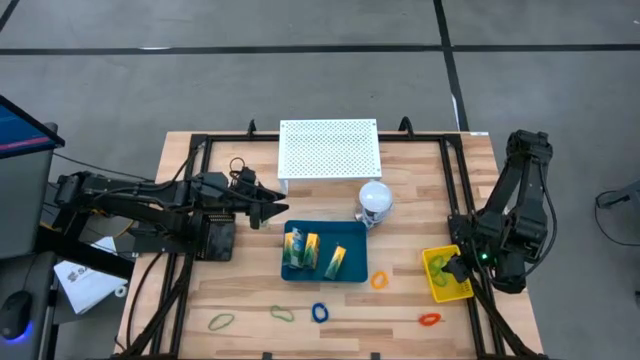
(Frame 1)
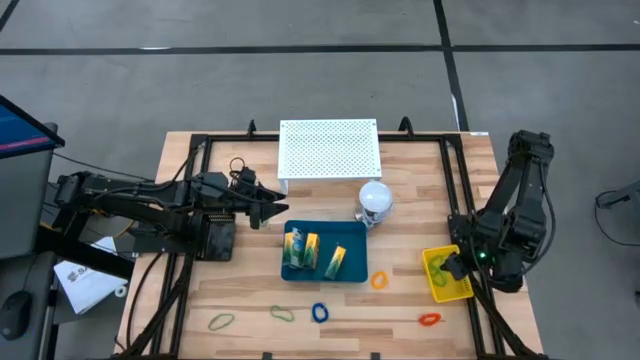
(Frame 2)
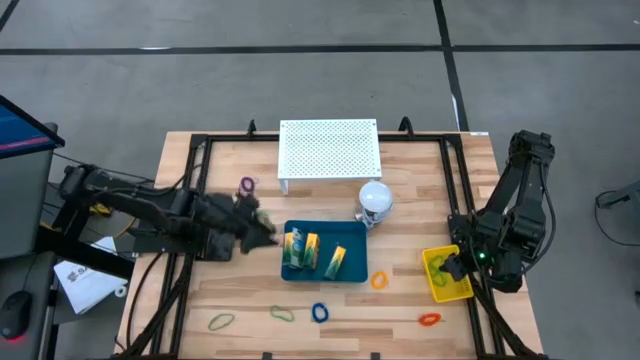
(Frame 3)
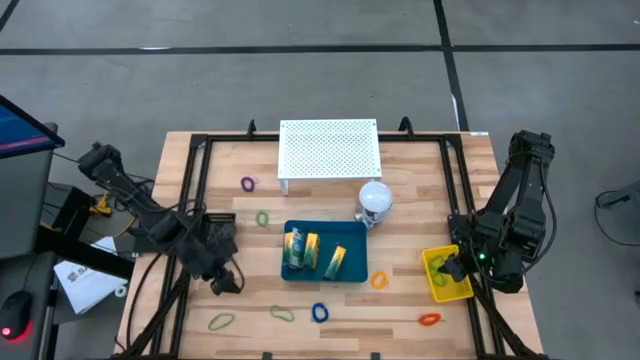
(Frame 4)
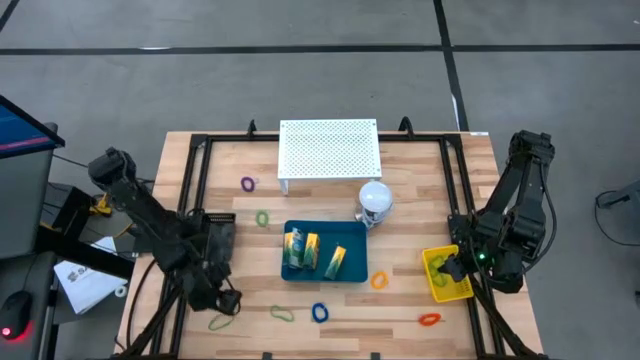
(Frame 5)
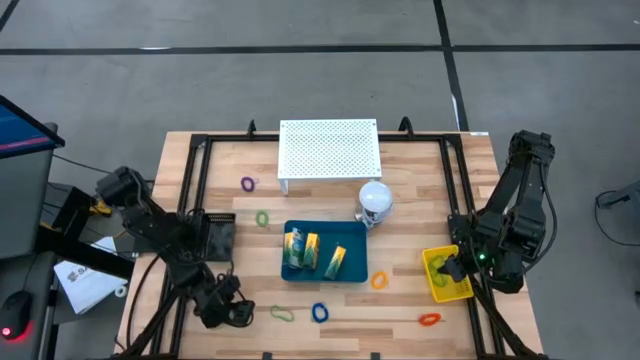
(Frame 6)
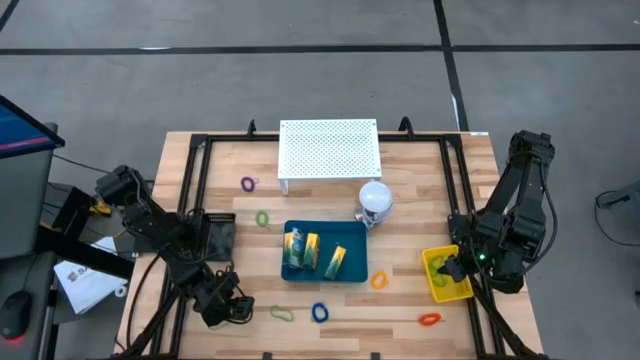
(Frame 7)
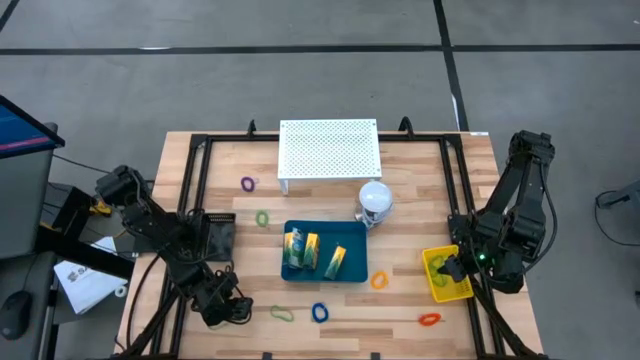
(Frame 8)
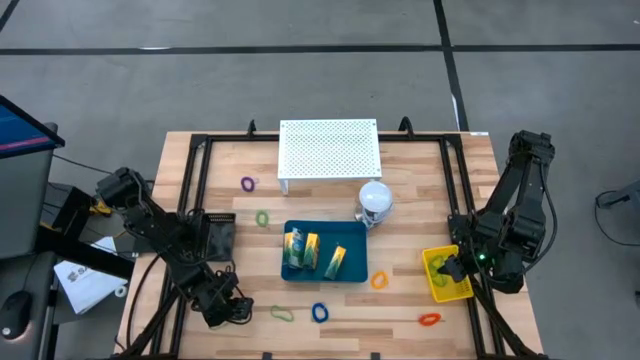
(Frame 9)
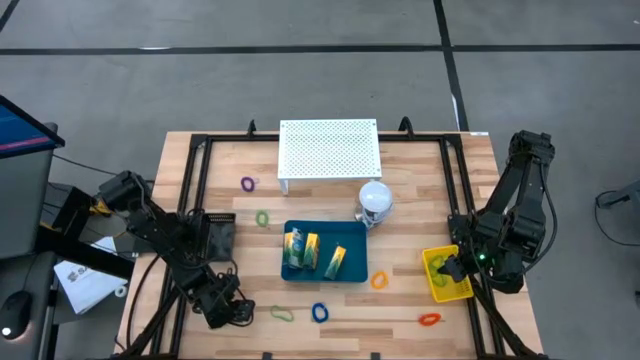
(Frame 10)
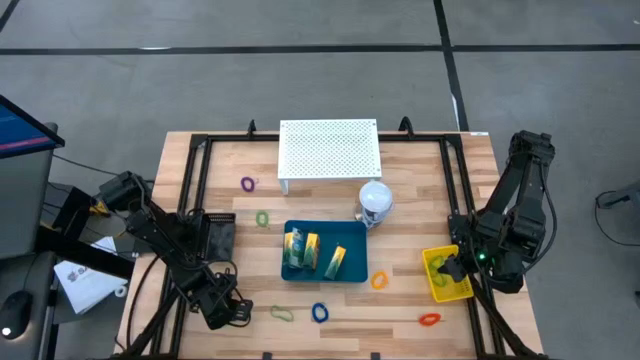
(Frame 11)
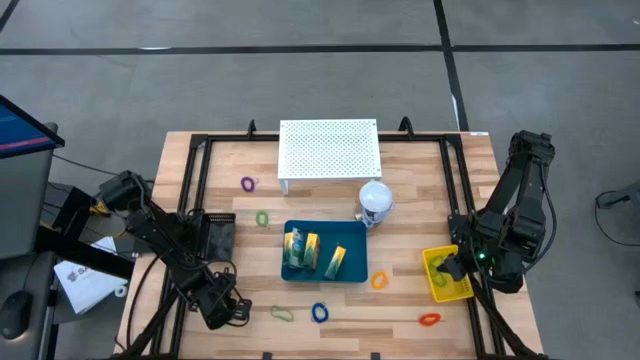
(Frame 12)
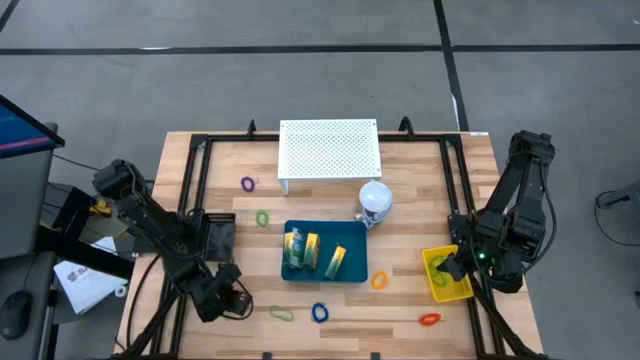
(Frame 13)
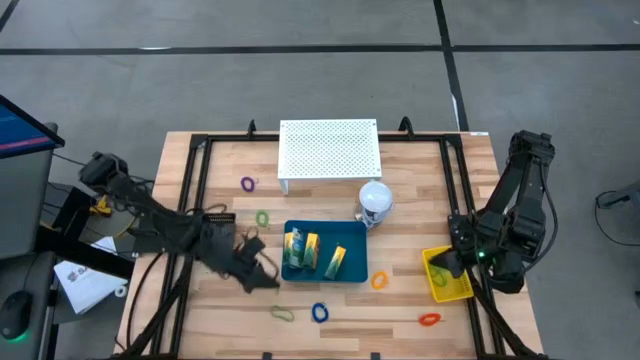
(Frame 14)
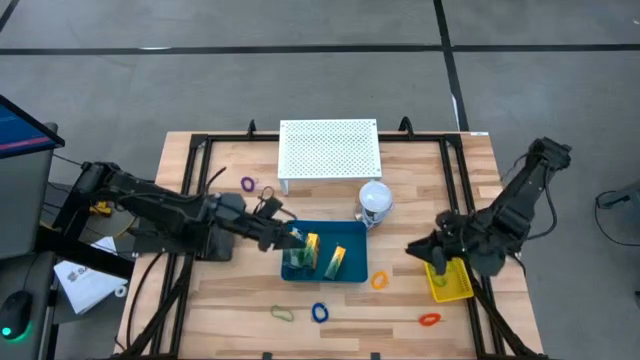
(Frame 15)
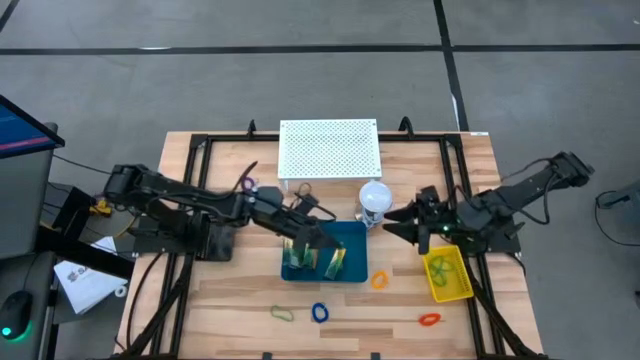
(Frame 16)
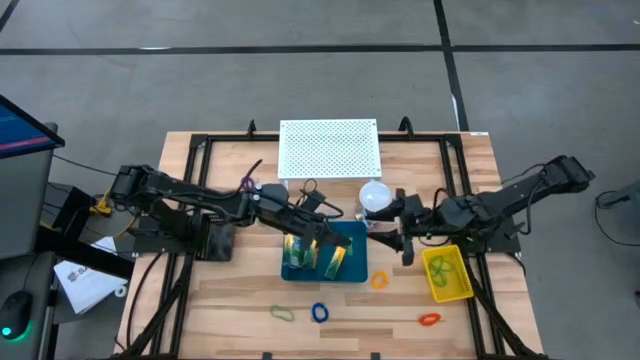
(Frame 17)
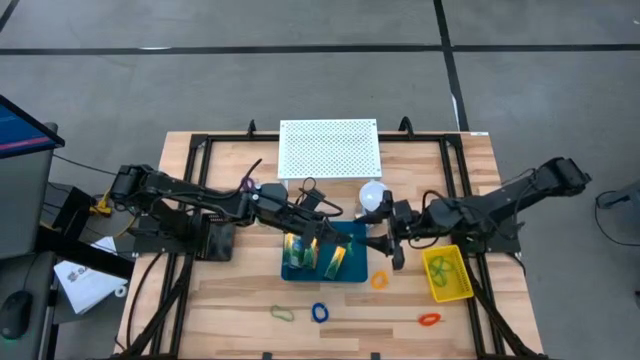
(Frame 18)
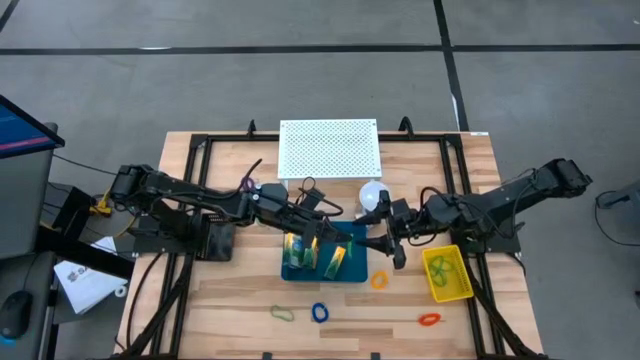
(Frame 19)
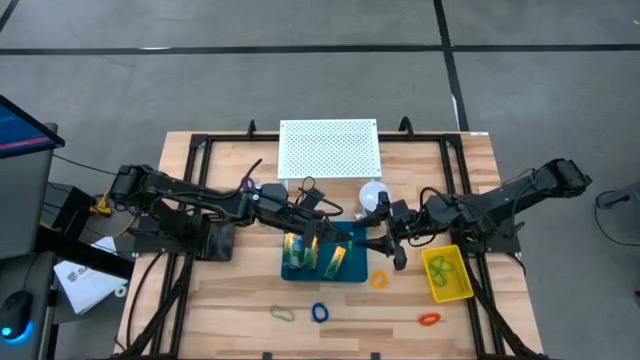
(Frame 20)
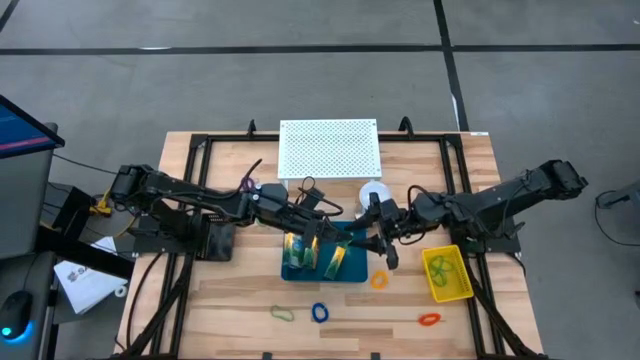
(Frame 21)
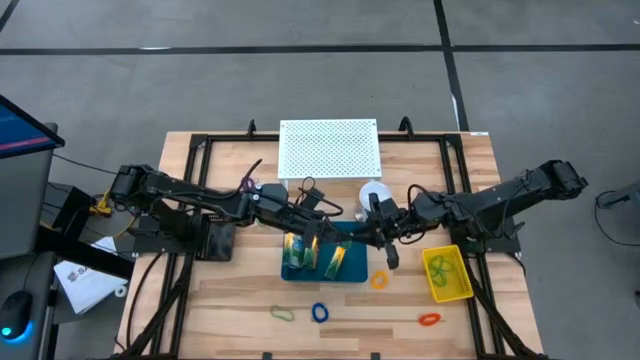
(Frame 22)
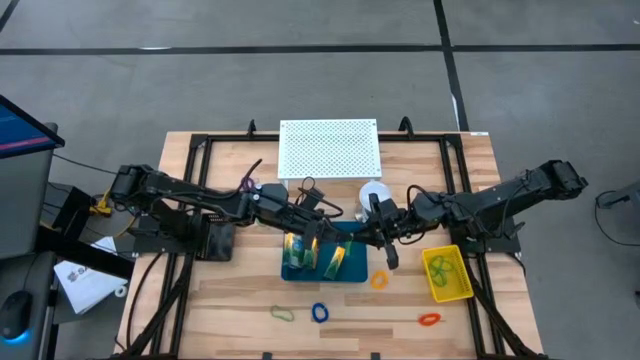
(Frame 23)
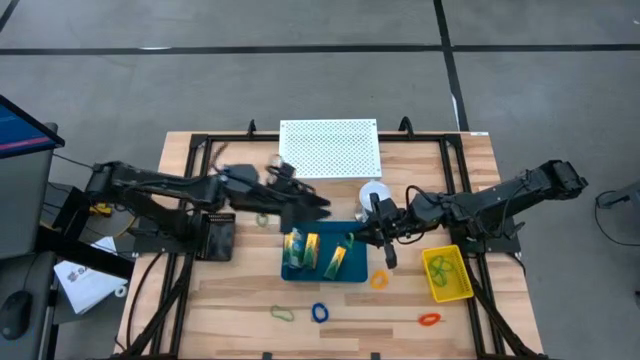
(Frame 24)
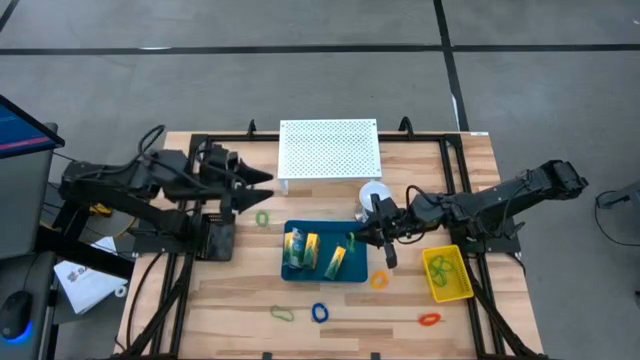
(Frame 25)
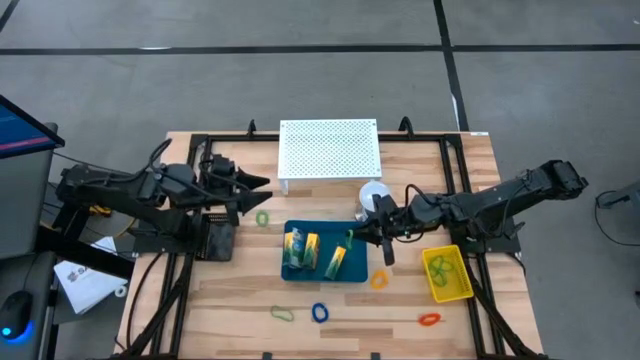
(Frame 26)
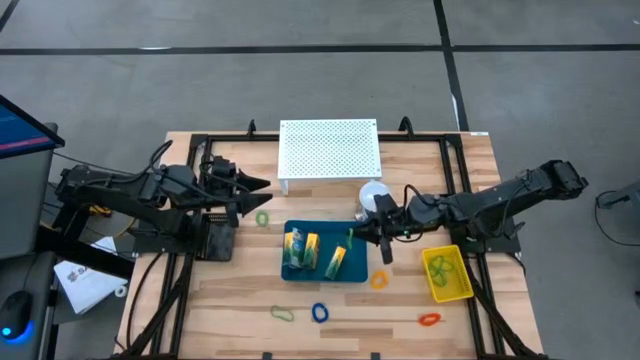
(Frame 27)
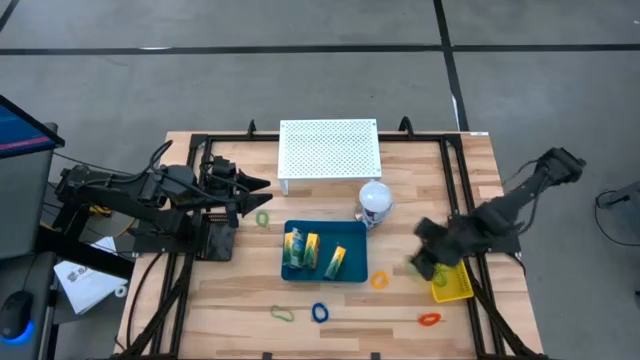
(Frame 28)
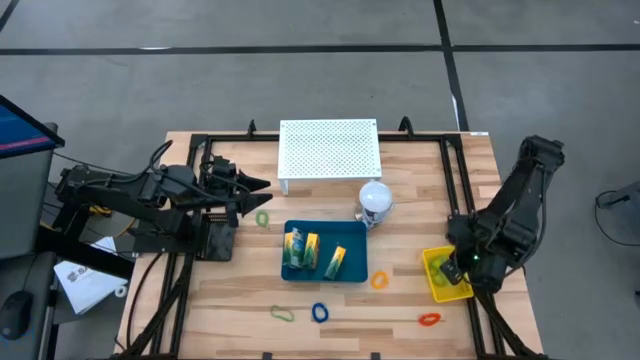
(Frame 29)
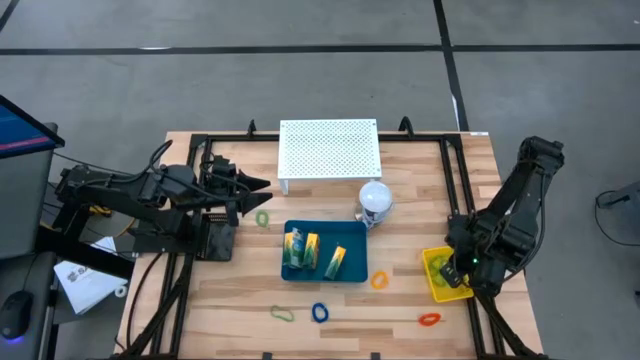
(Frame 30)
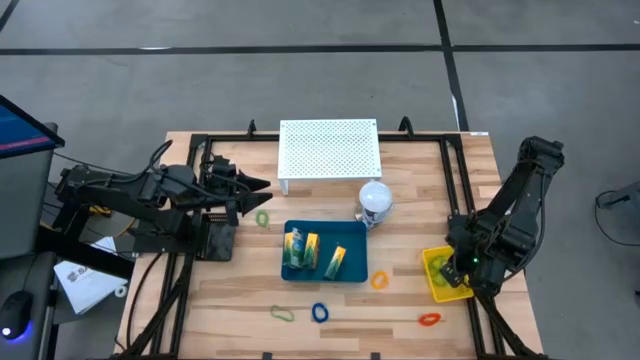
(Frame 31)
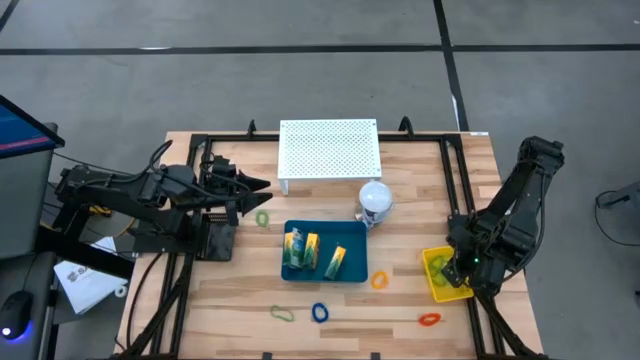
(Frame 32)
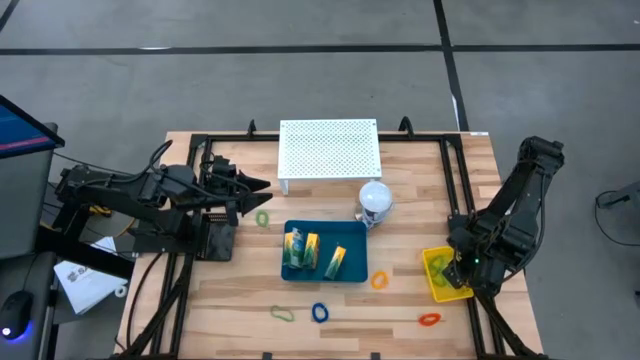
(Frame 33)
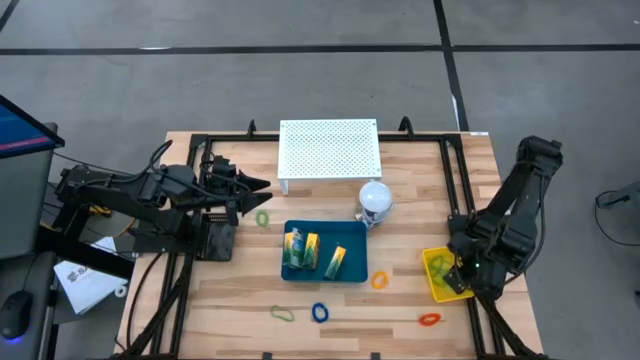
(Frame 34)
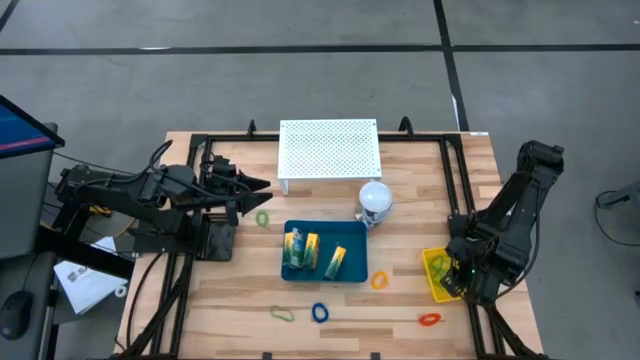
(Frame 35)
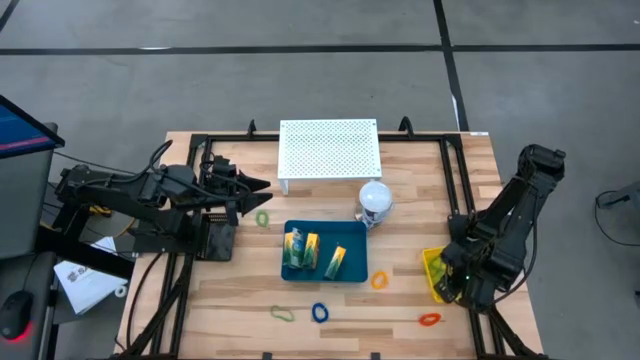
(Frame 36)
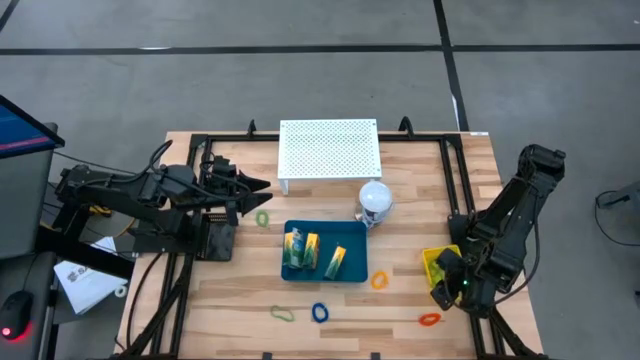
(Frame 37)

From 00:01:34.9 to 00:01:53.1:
Task: Pick & Place Office Desk Supplies
Put the left green rubber band into the yellow bin

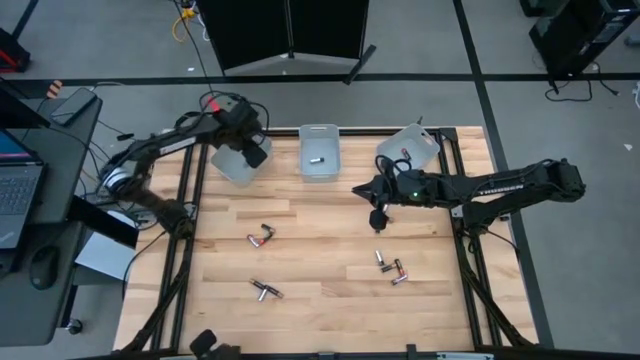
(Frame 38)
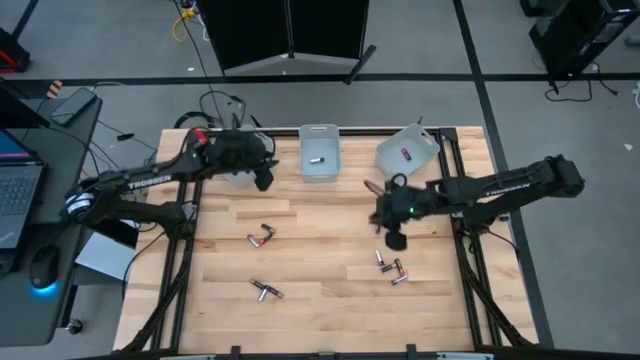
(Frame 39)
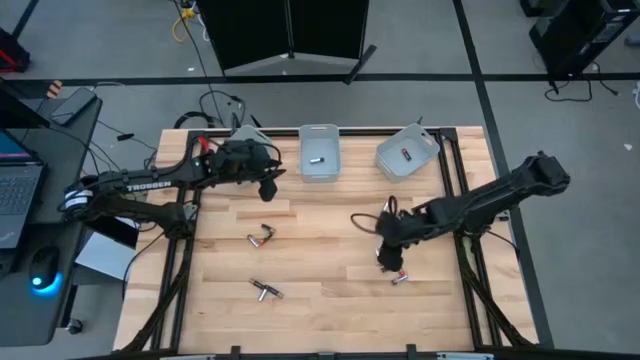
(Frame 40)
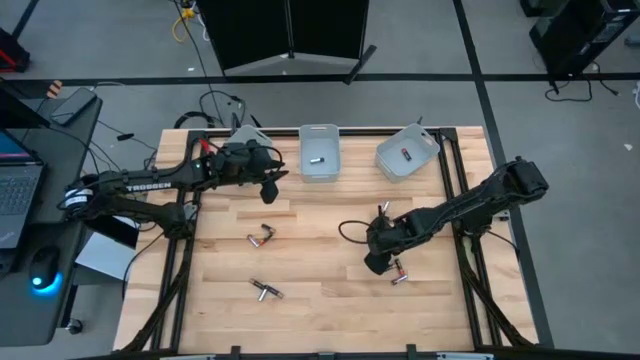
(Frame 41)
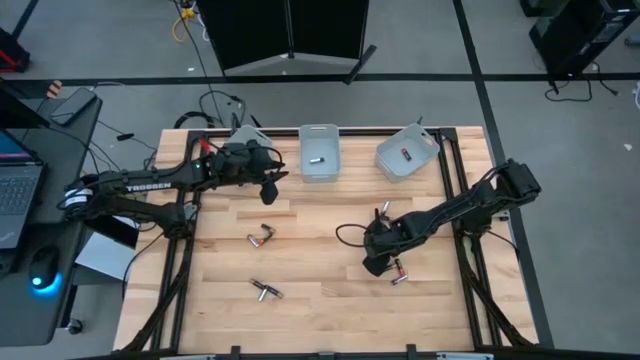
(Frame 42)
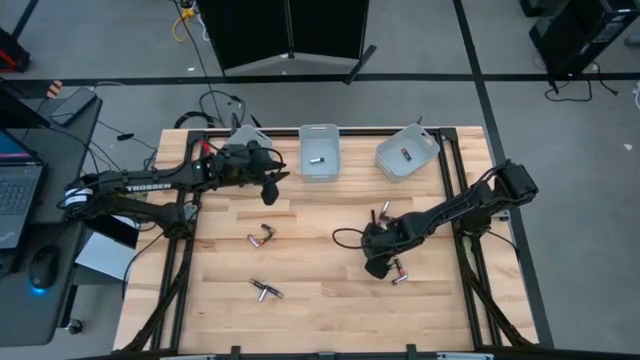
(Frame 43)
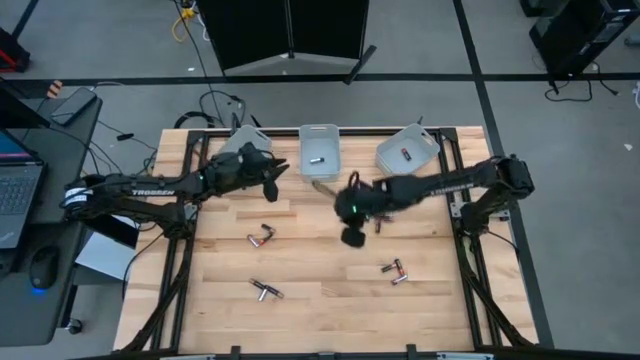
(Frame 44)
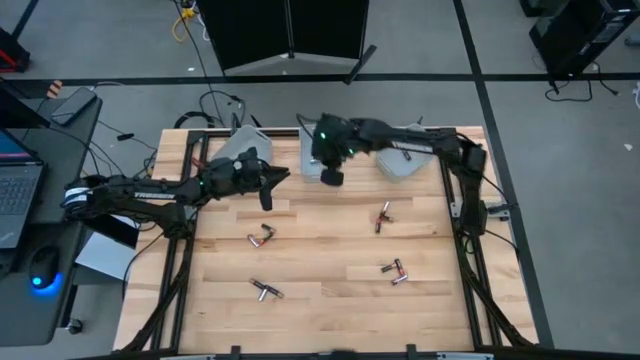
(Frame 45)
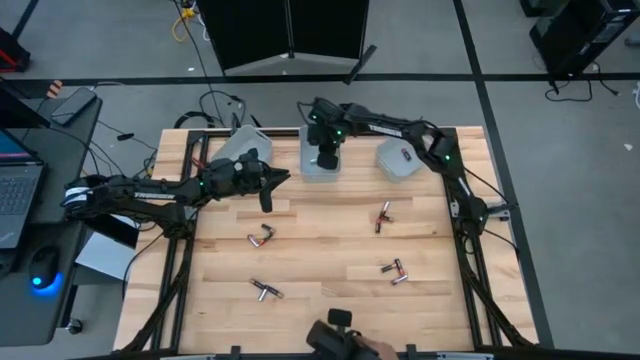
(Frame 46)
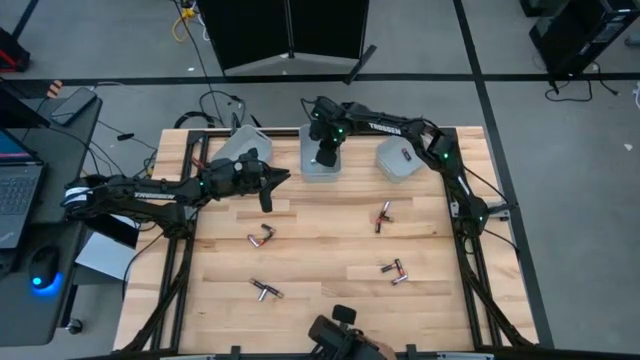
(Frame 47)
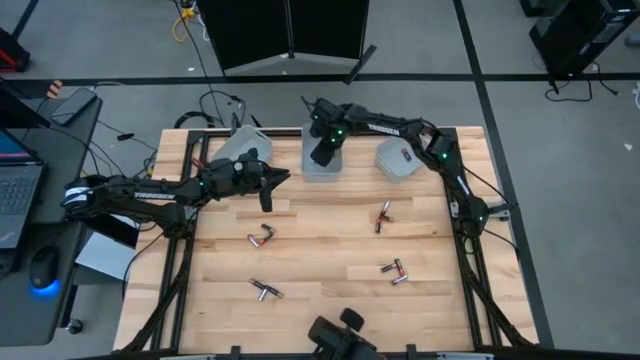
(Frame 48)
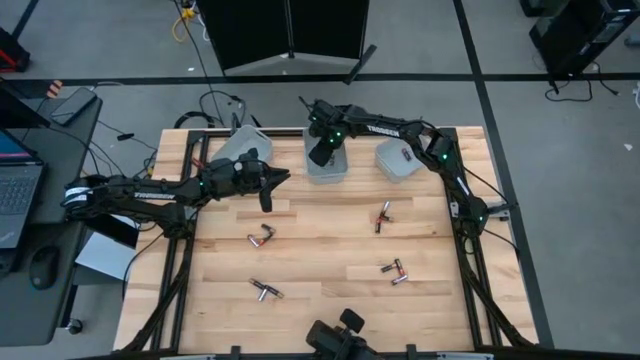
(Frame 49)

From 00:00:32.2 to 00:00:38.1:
Task: Sort batteries
Put the silver battery into the middle gray bin
